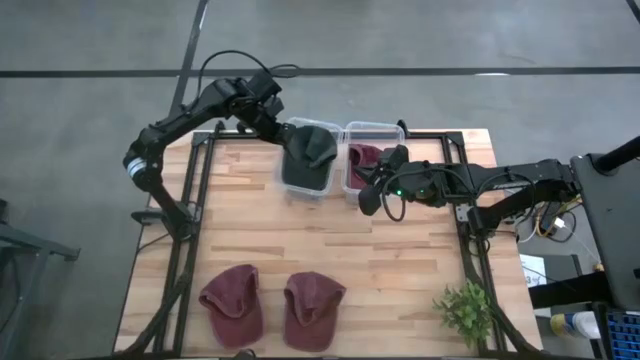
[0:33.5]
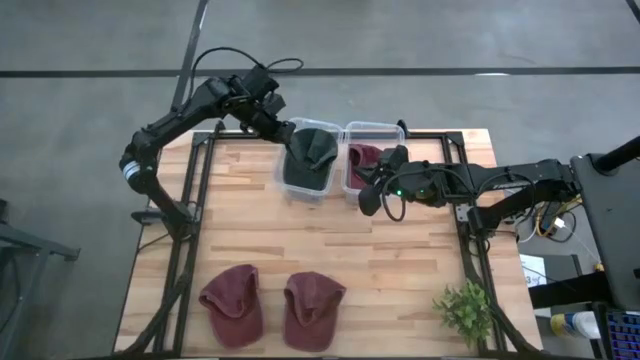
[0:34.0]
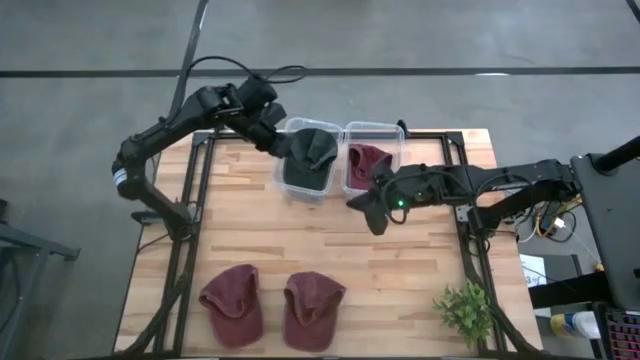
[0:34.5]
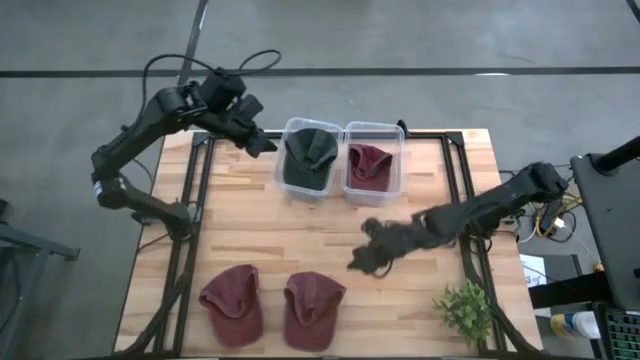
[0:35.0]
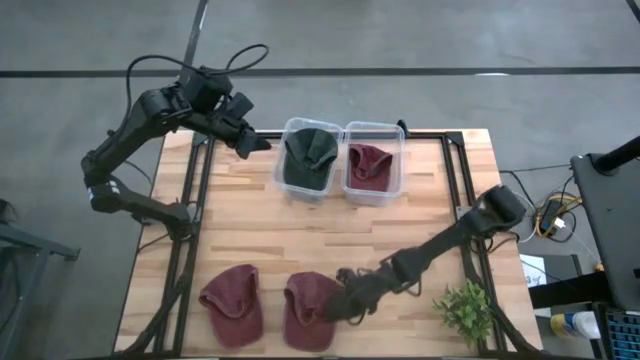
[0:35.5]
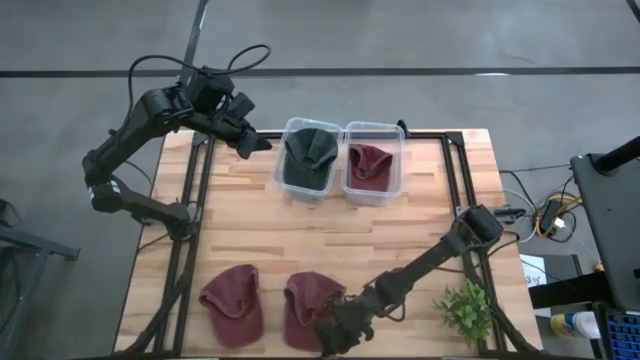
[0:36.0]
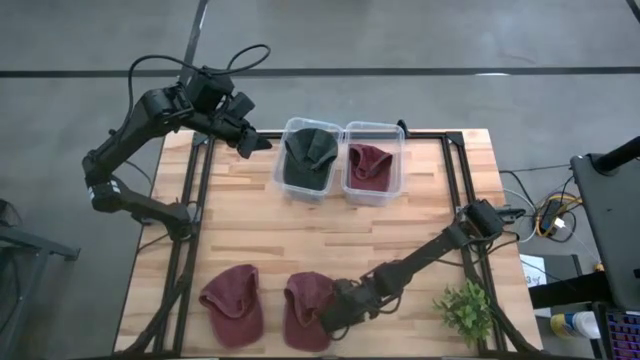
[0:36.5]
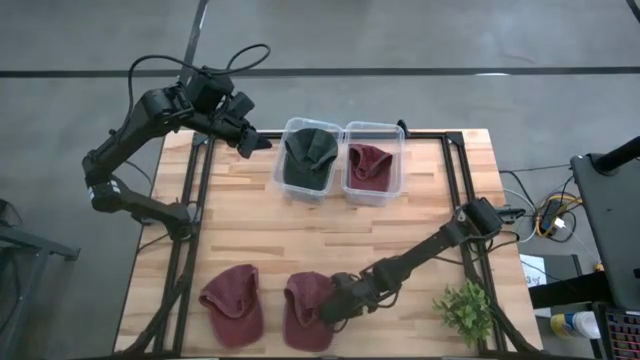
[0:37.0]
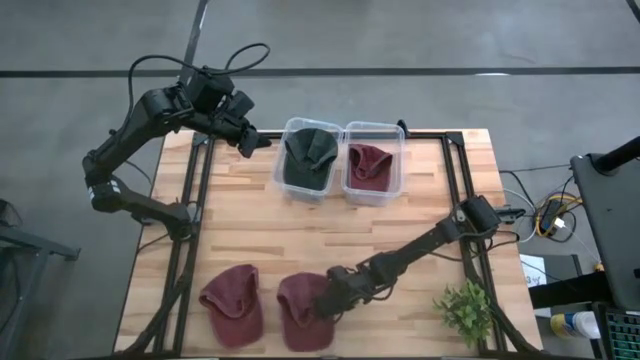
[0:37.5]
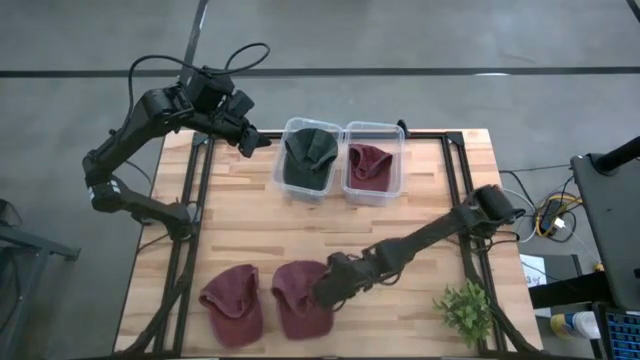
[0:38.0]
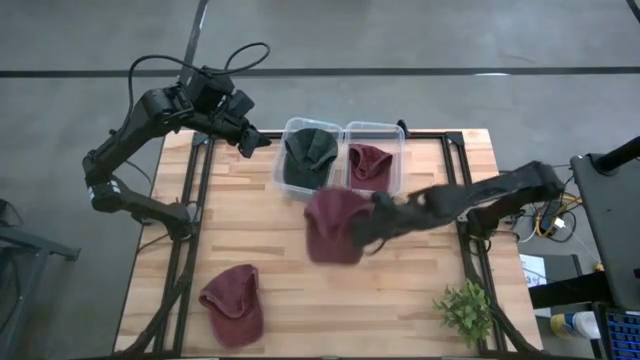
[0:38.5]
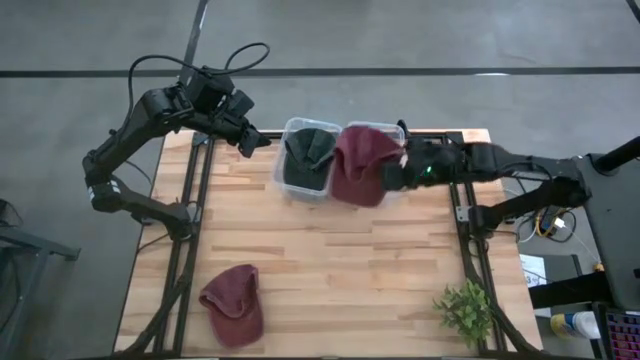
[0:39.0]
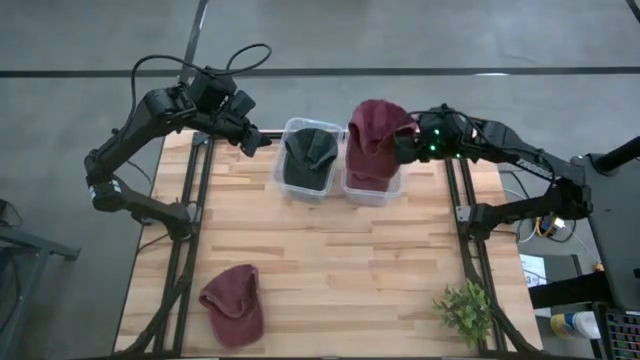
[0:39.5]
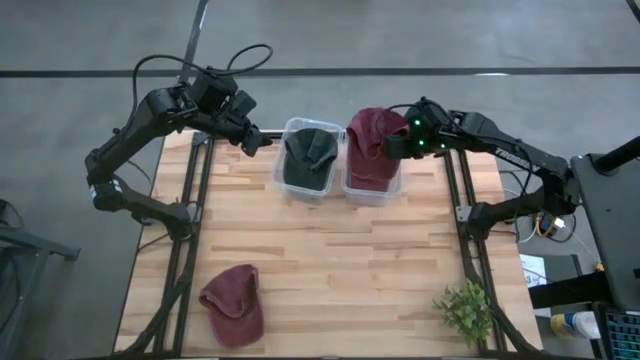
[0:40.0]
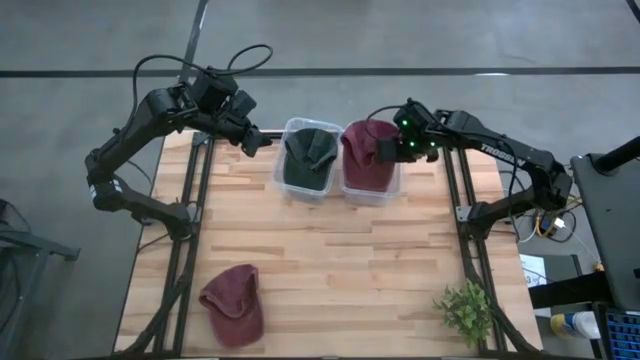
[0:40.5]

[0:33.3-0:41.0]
Task: Pick & Place hat
Put the right red cap into the right transparent bin

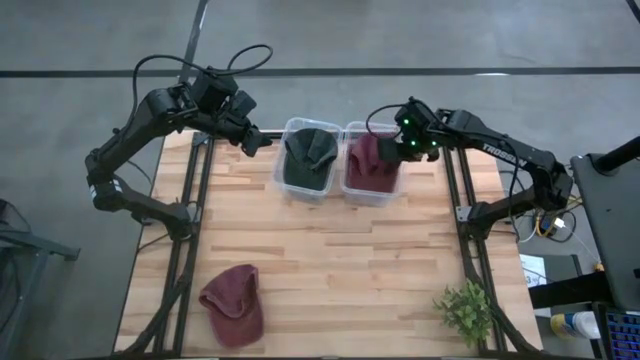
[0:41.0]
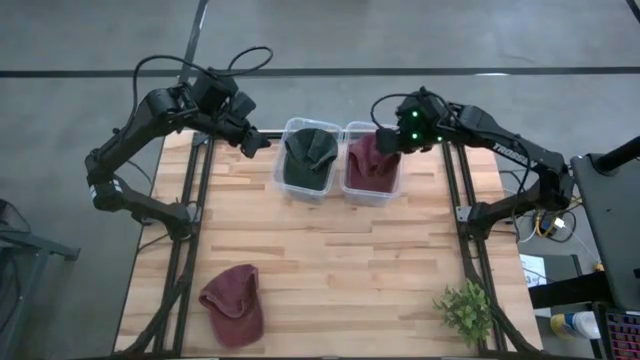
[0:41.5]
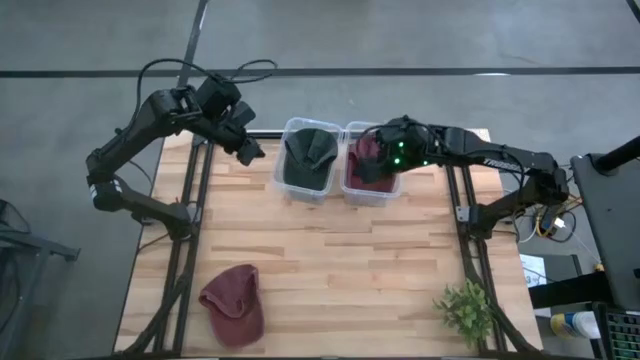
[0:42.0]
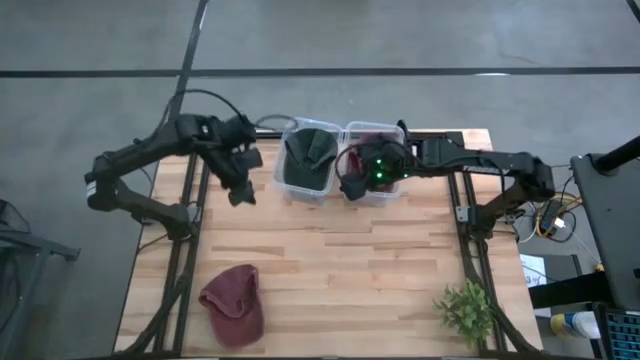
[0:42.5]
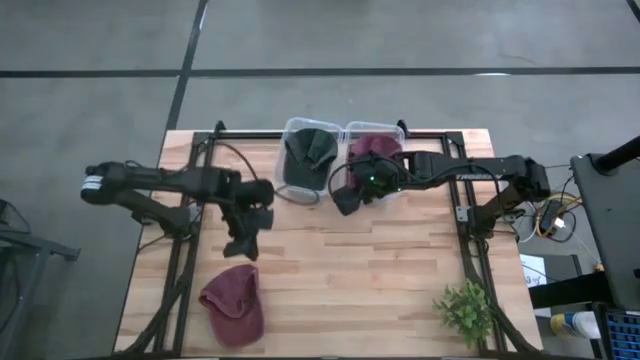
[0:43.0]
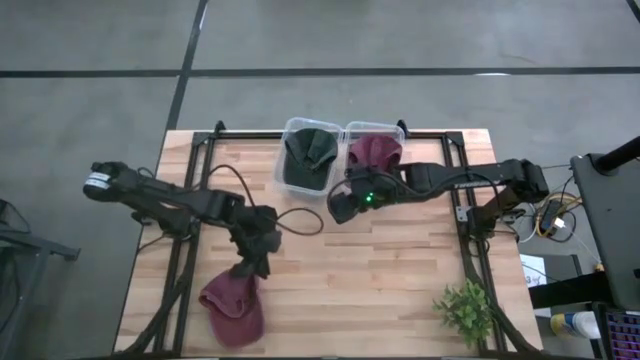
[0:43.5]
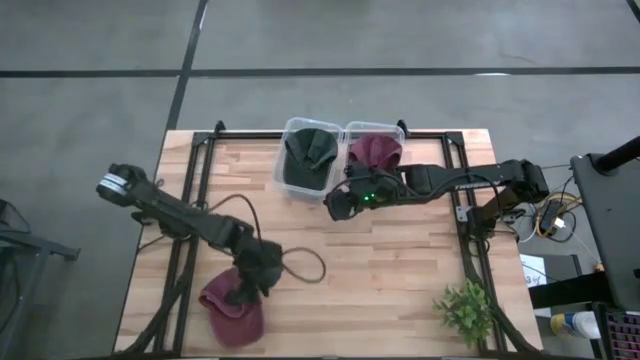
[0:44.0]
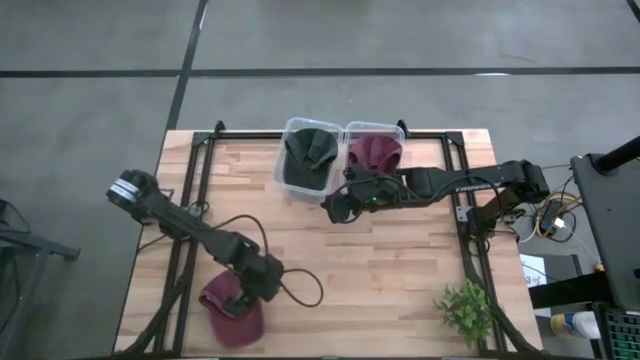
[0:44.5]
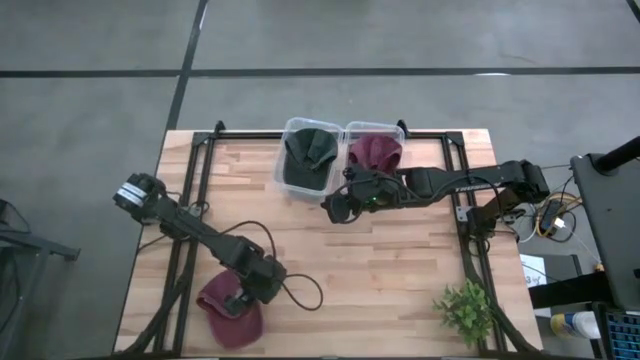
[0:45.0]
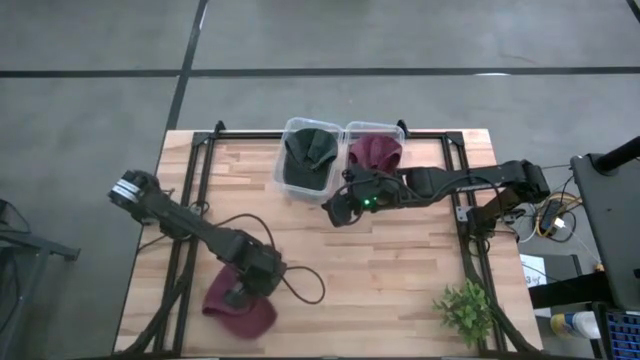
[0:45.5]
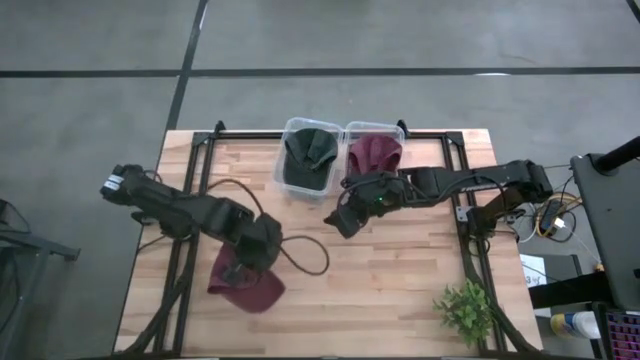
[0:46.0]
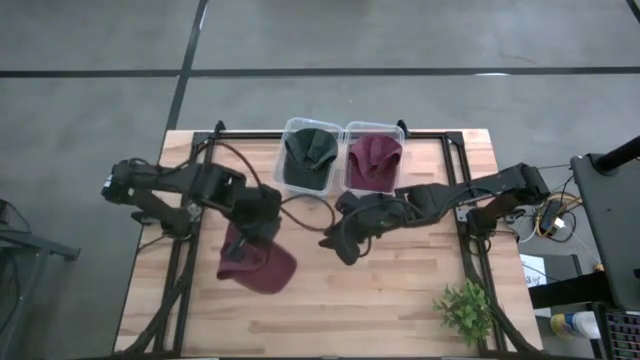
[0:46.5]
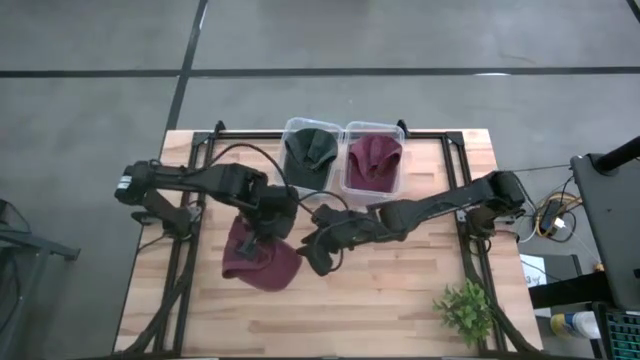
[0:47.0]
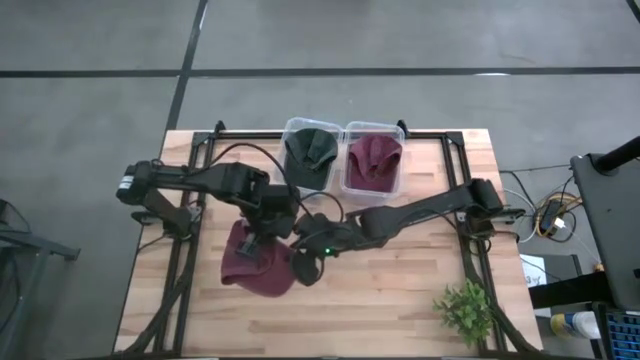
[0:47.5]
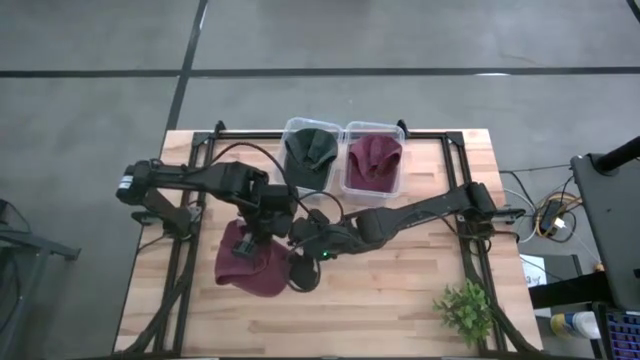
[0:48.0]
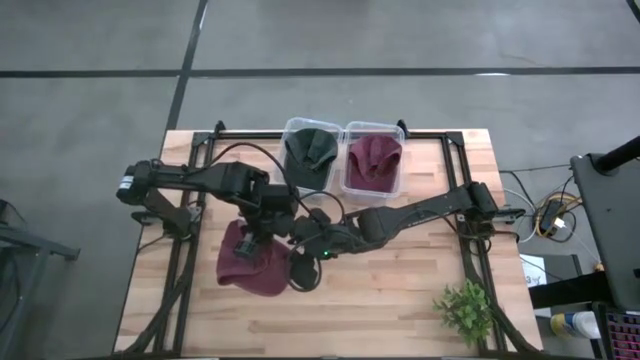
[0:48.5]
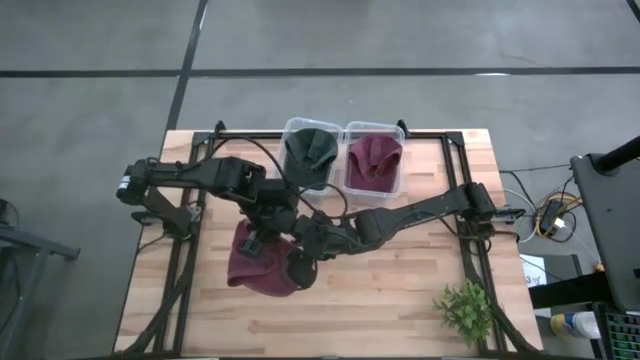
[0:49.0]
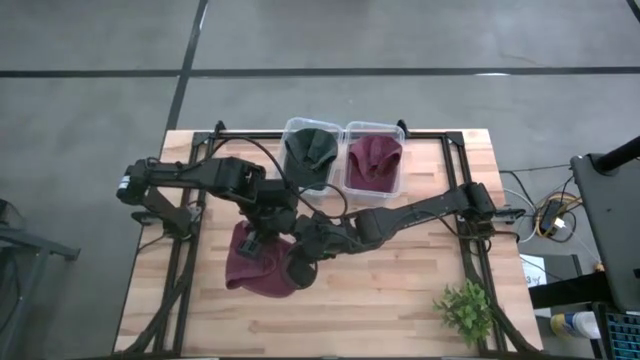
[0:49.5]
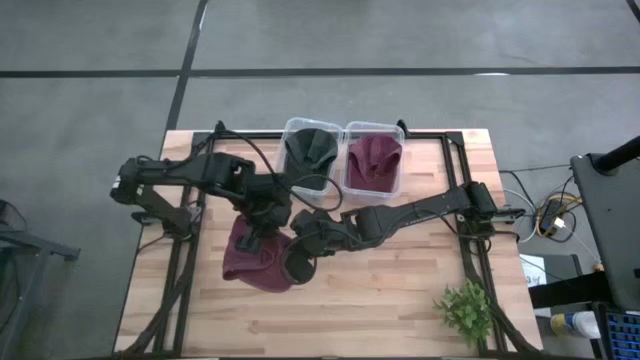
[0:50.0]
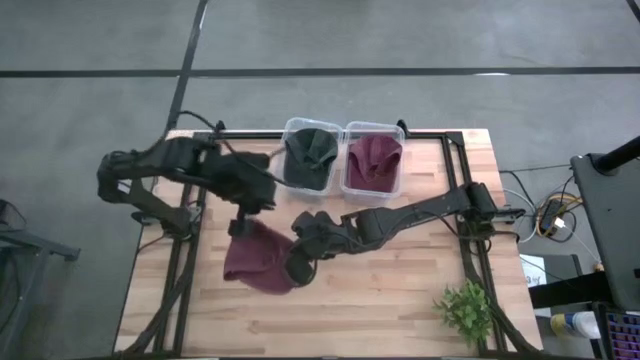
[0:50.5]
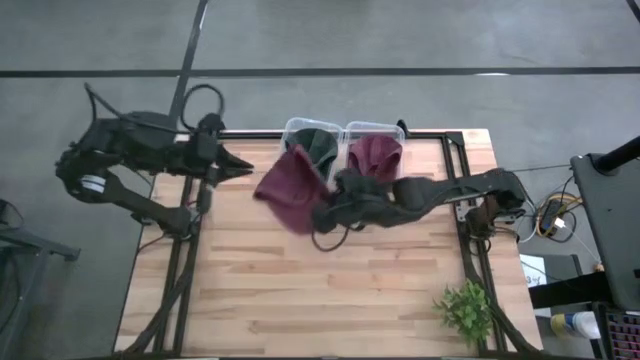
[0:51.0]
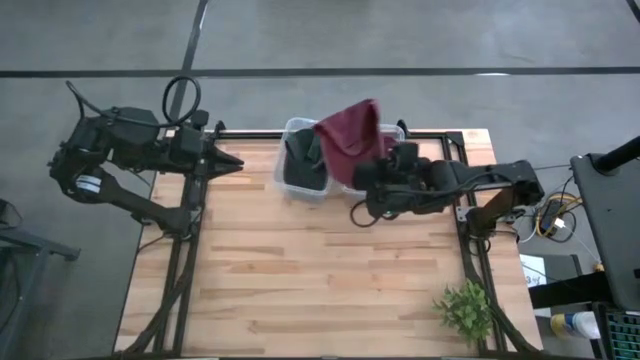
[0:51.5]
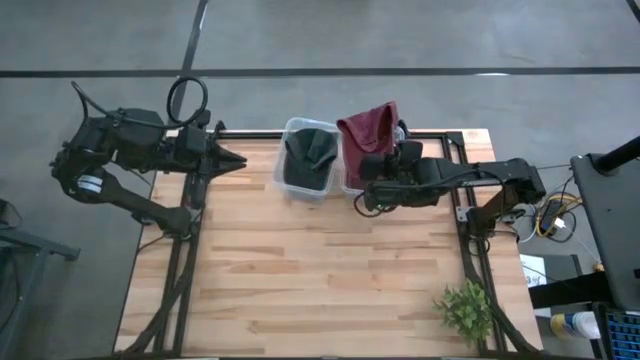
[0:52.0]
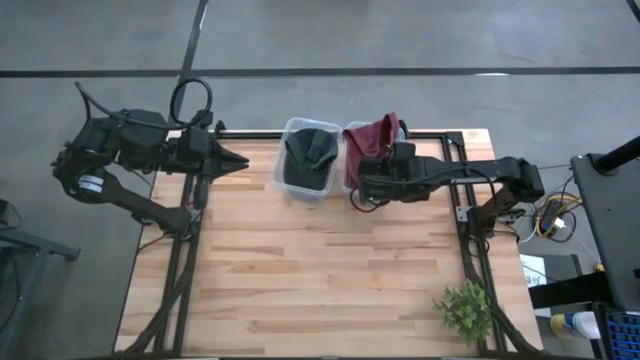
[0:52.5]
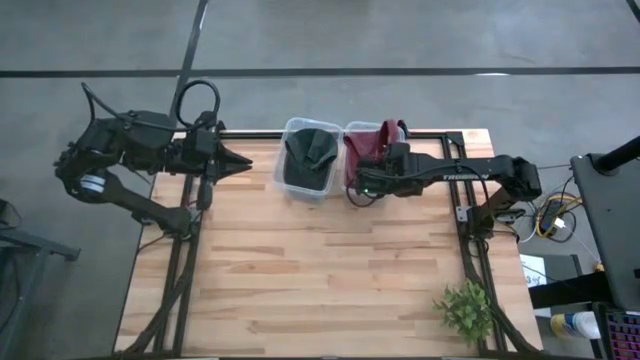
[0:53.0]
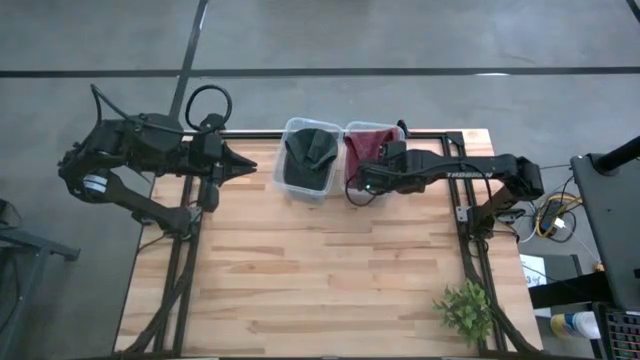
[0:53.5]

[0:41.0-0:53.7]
Put the red cap into the right transparent bin

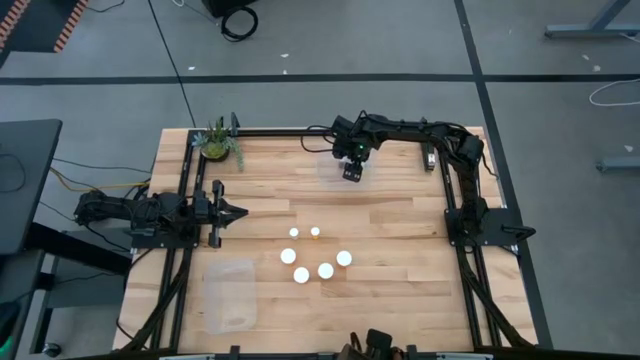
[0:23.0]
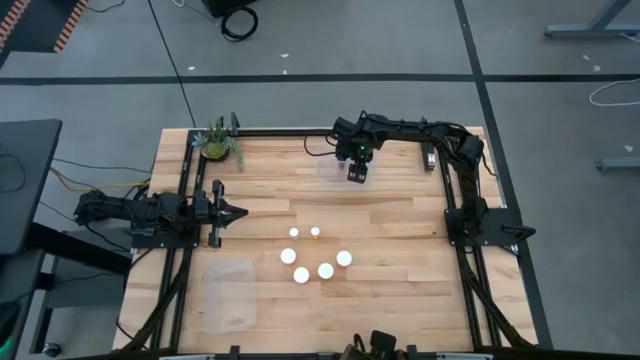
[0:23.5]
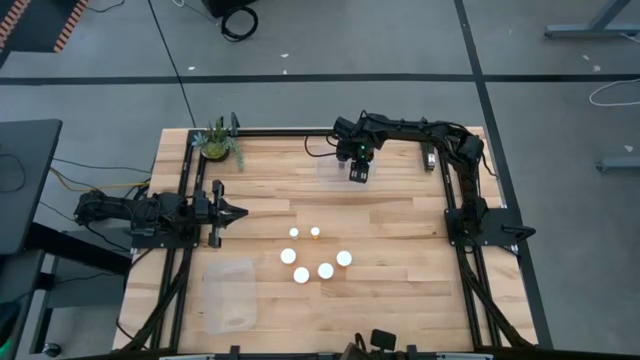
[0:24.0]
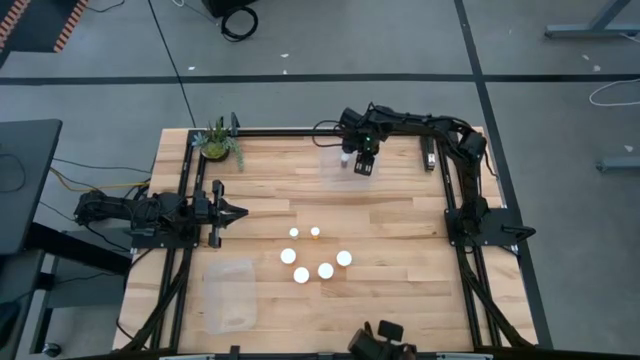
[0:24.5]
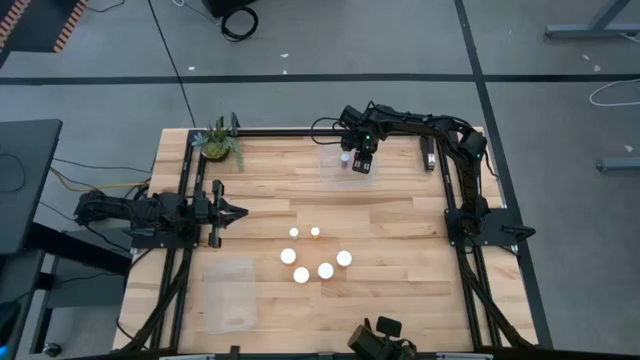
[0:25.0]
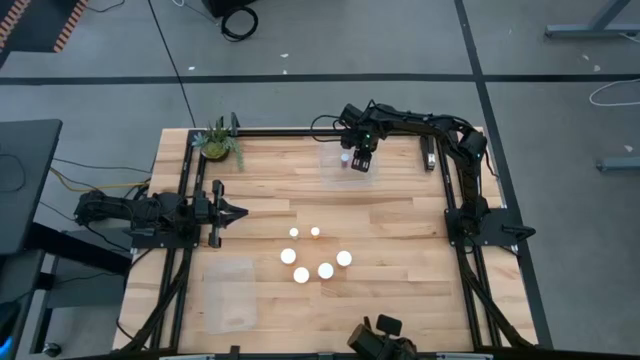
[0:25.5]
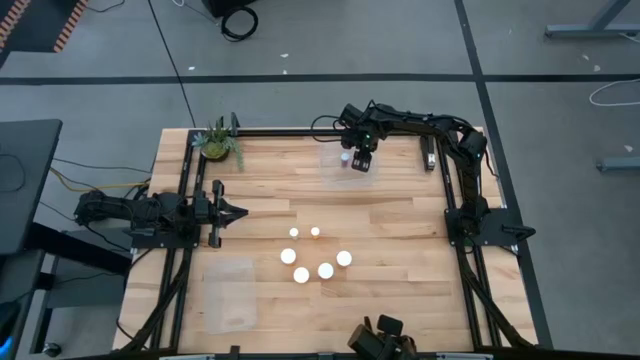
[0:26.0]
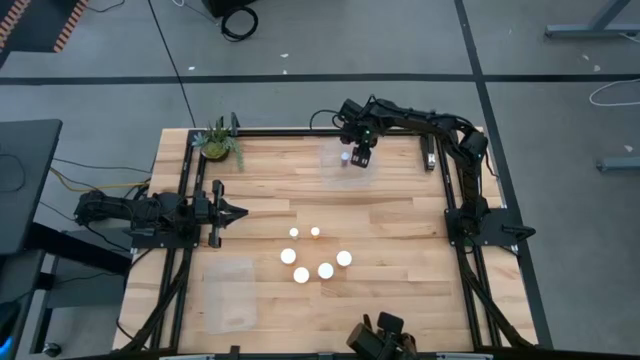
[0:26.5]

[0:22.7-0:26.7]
Task: Pick and place medicine bottles into bin by pill shape (circle, oval)
Adjust the small yellow pill bottle in the top transparent bin
